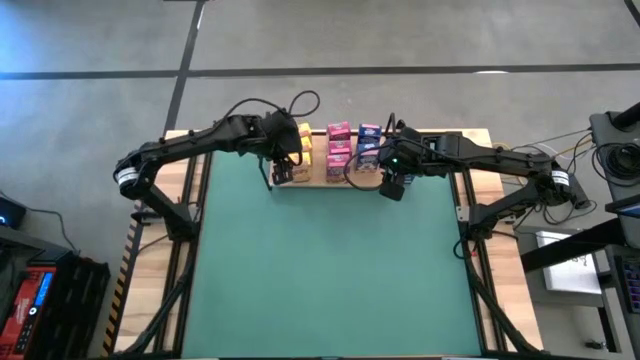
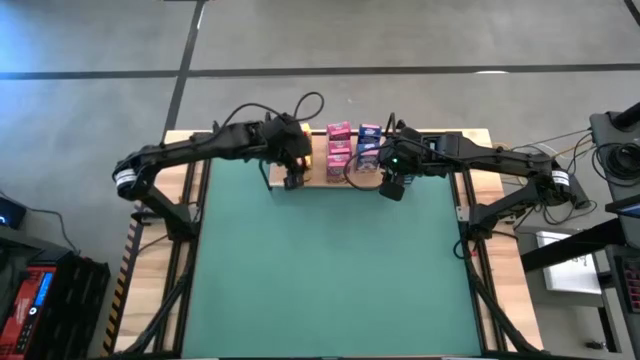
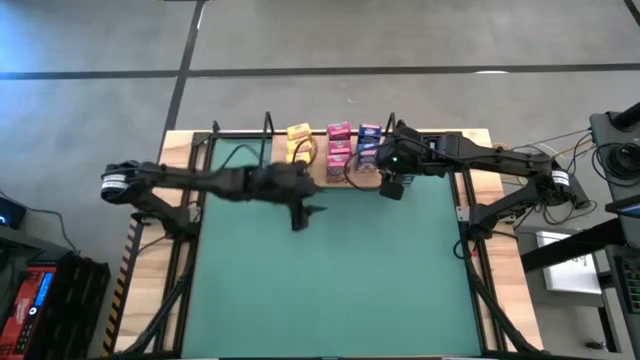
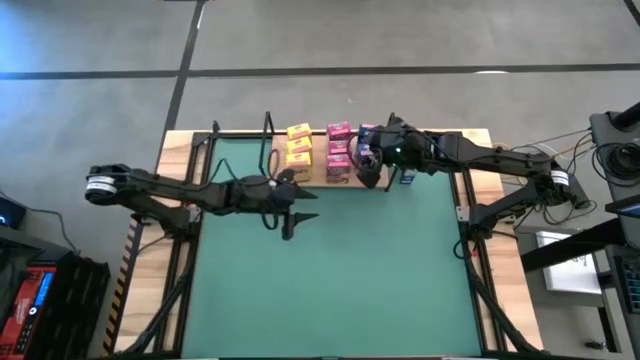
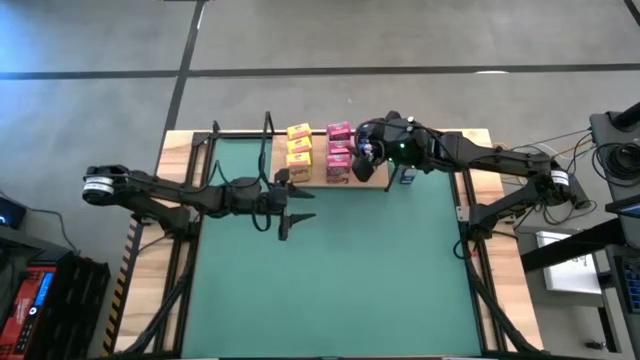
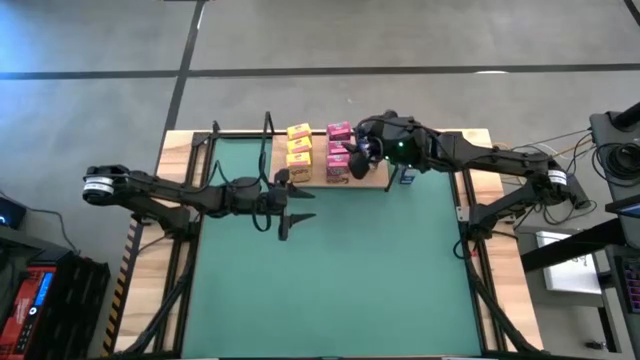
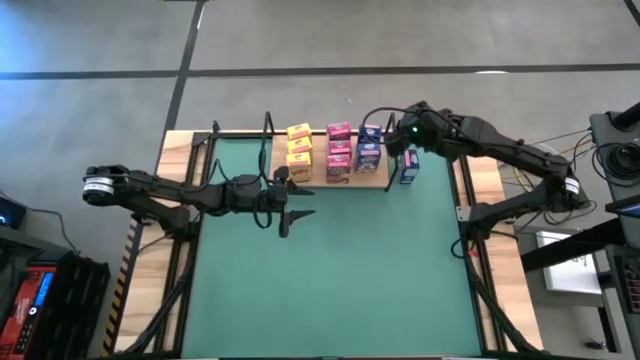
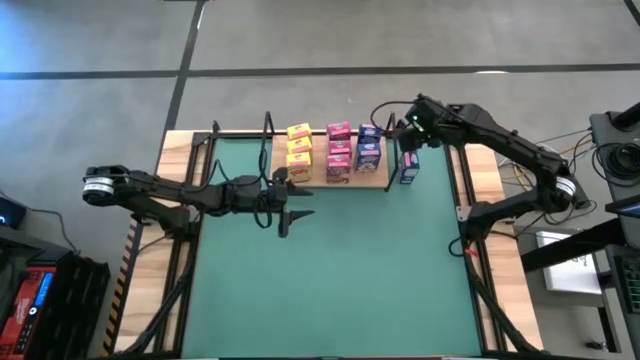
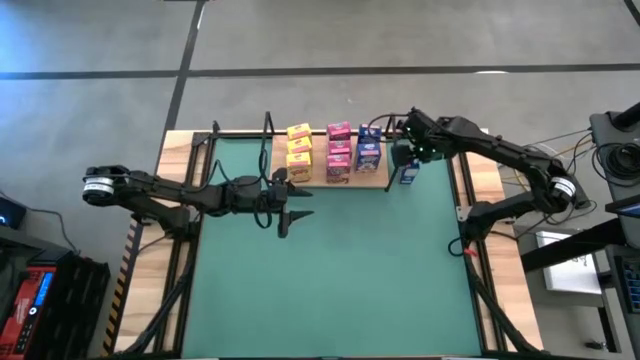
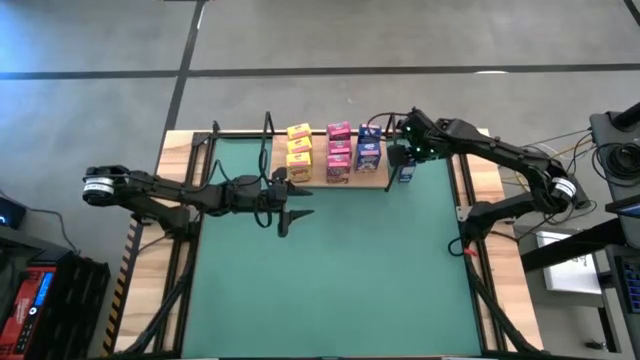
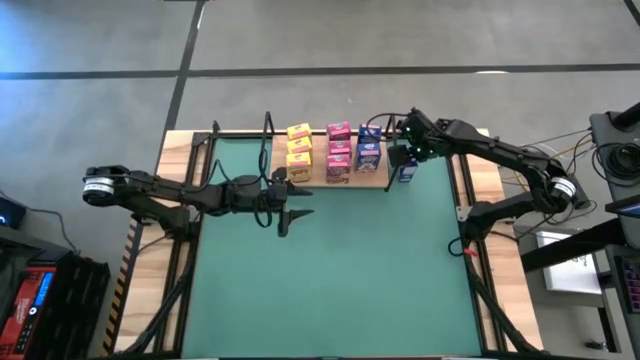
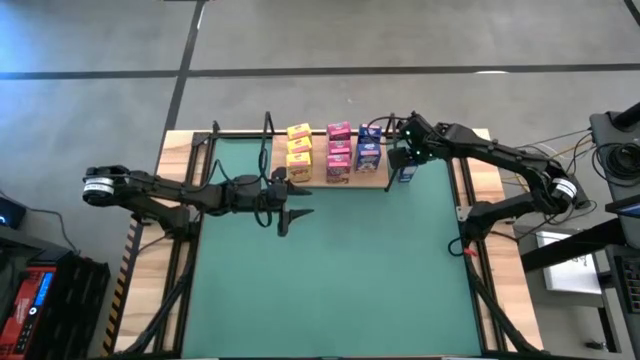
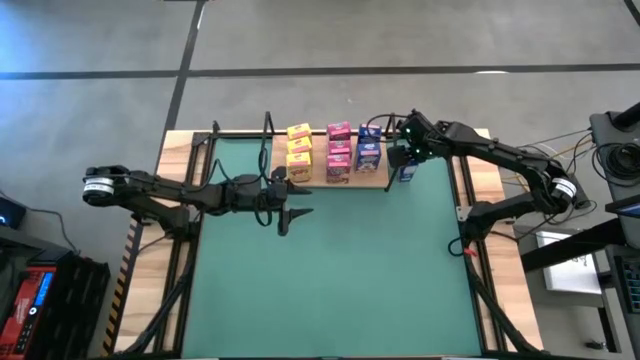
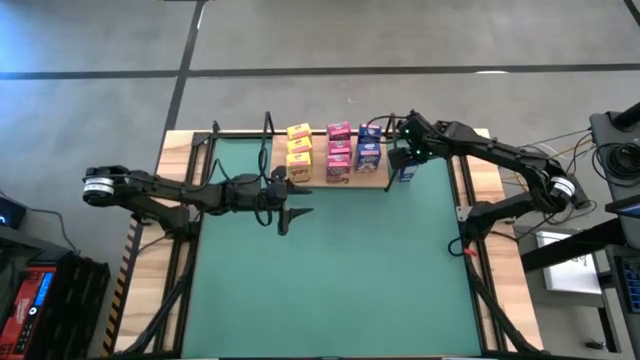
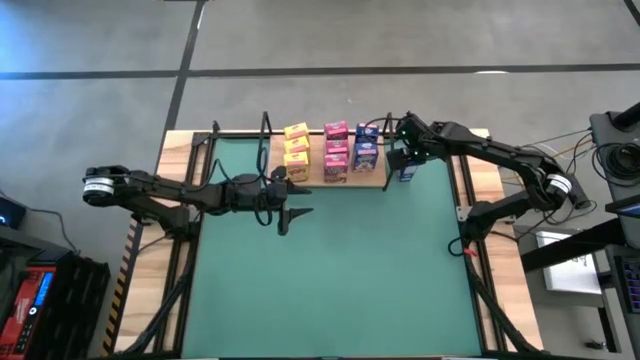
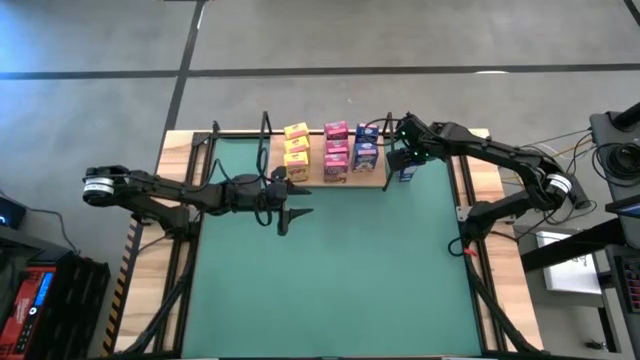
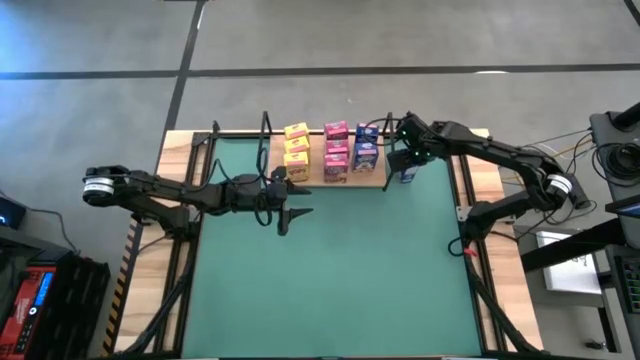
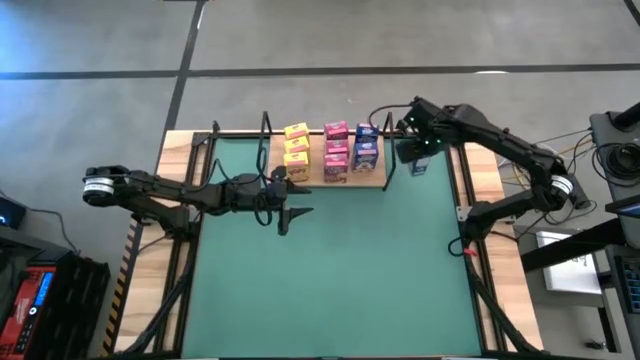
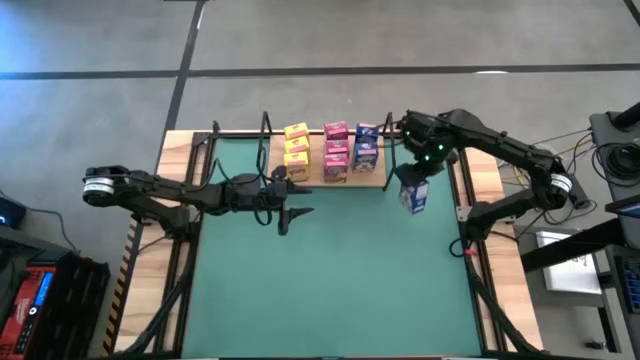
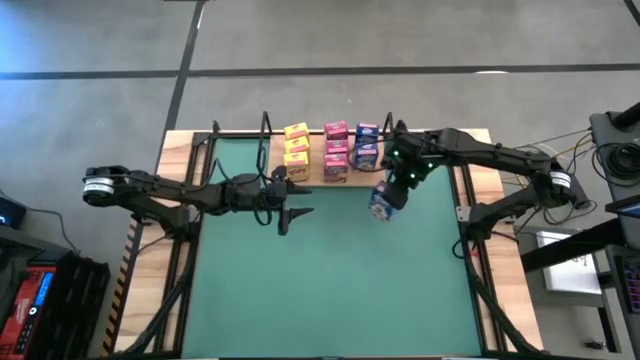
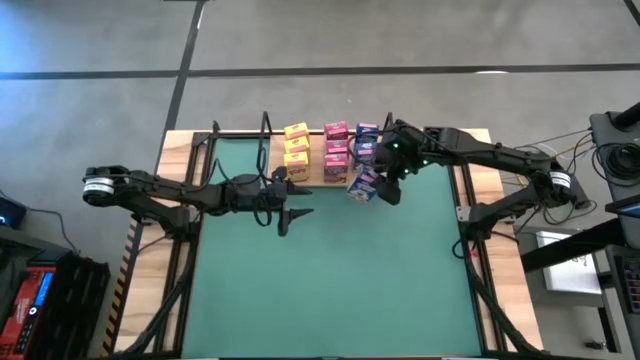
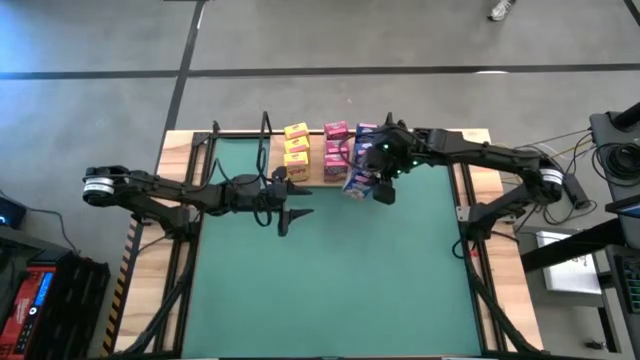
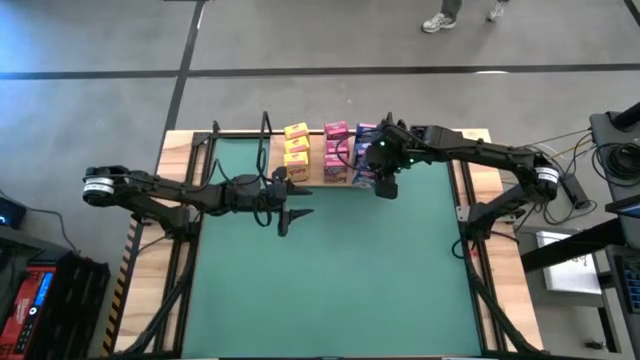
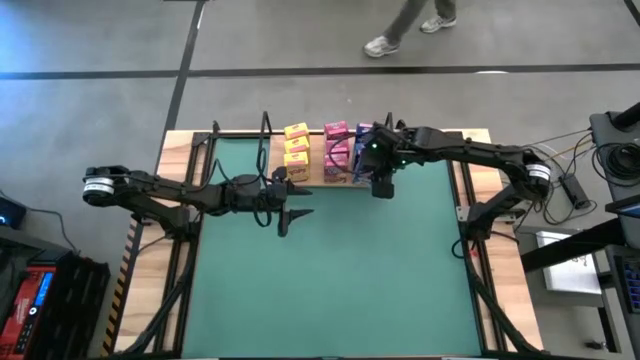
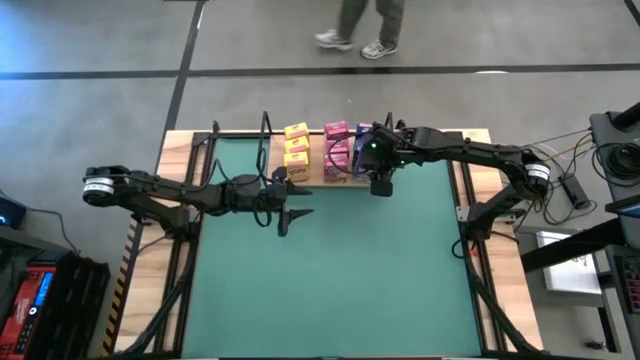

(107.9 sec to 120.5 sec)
Task: Stack cereal on shelf
Put the blue cereal box on the shelf and align with the other blue cereal boxes

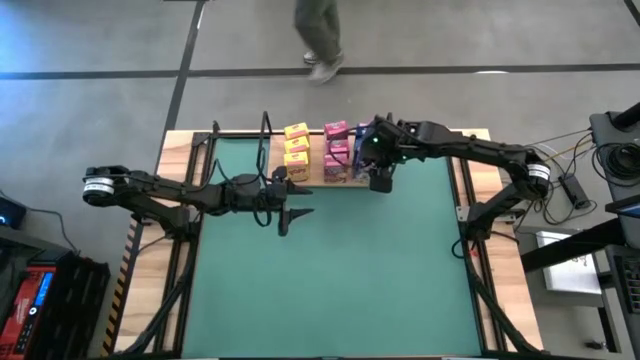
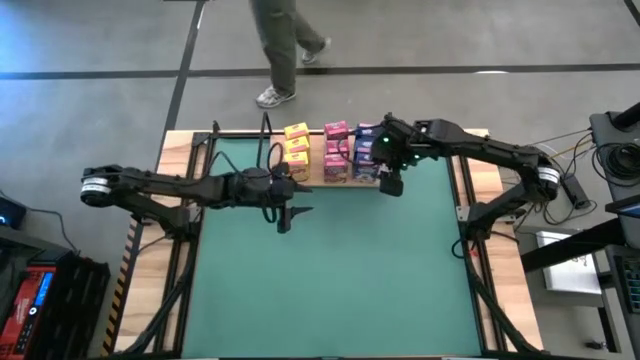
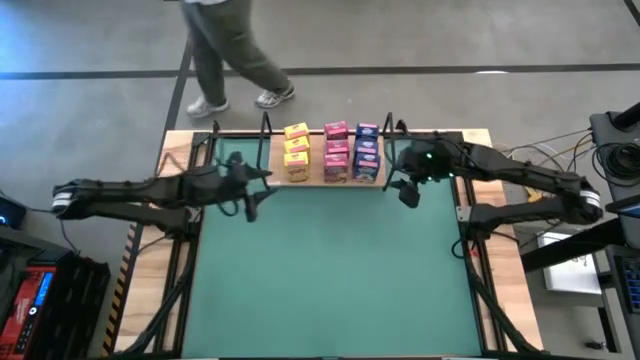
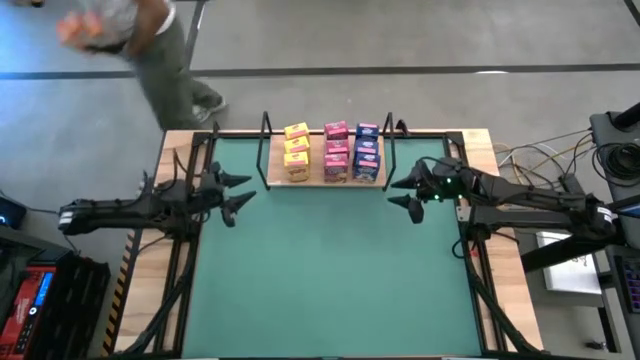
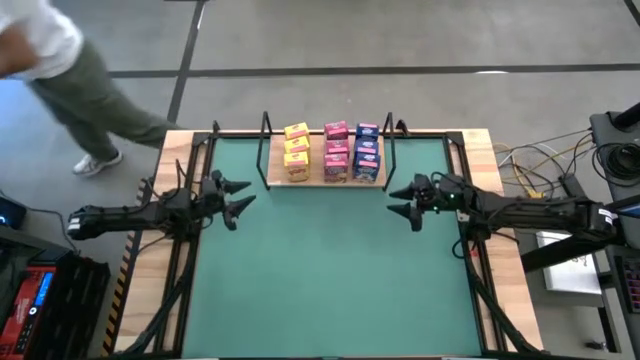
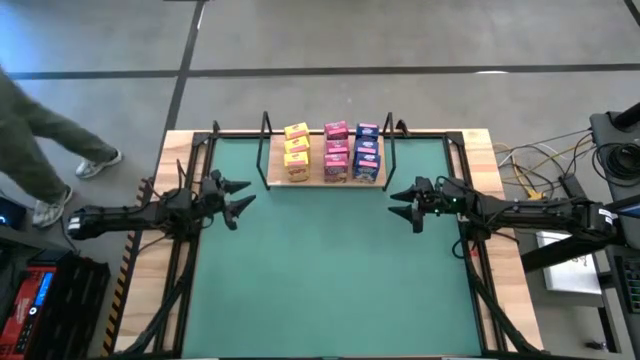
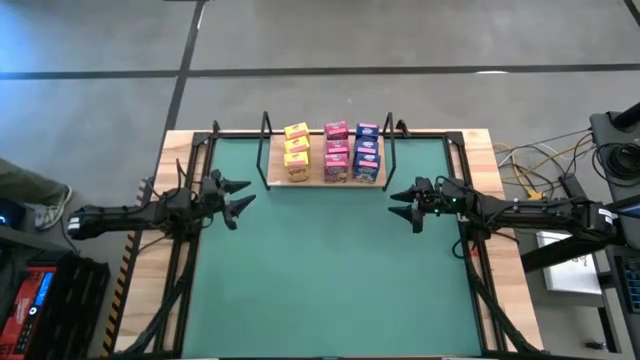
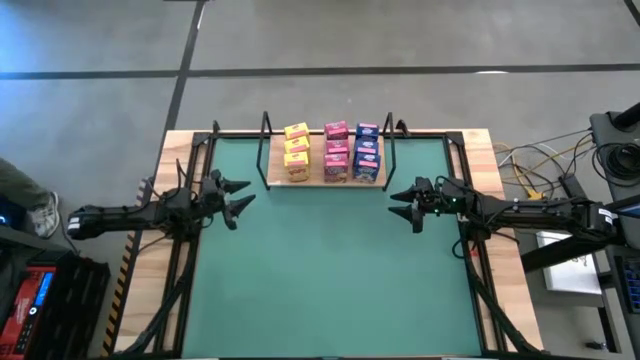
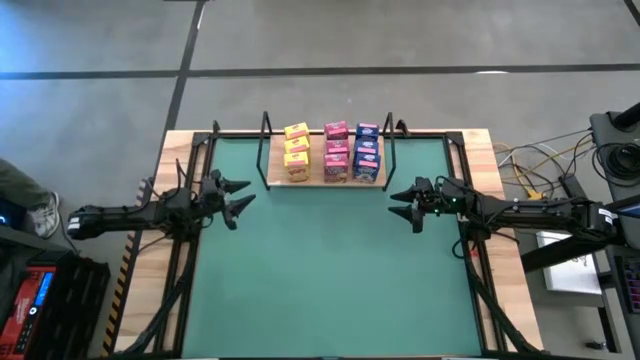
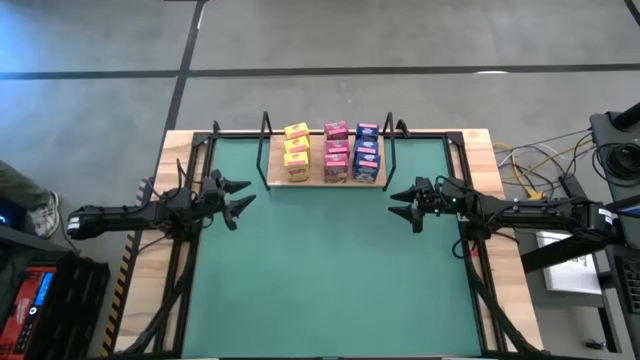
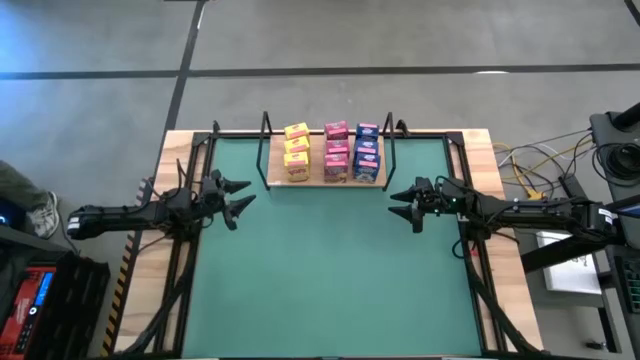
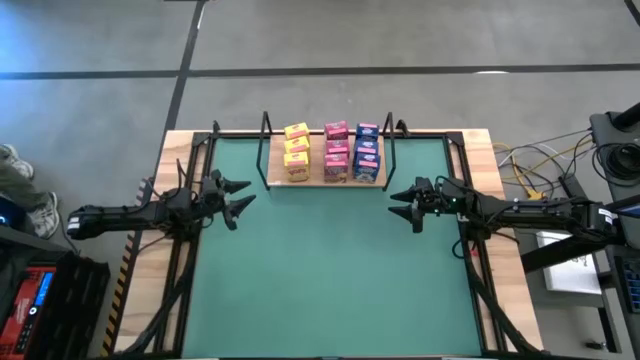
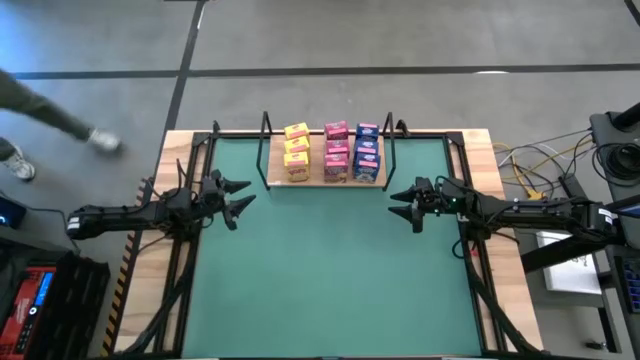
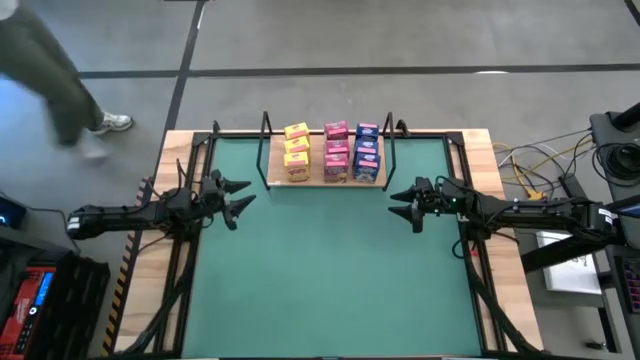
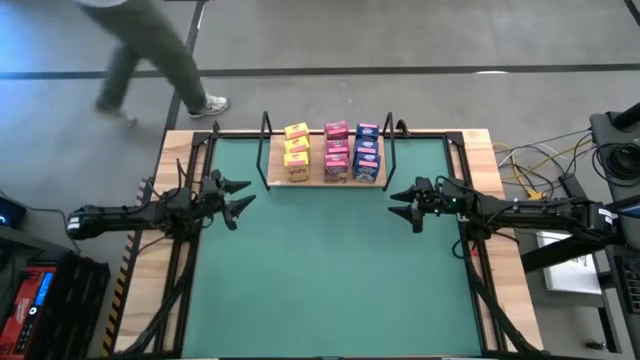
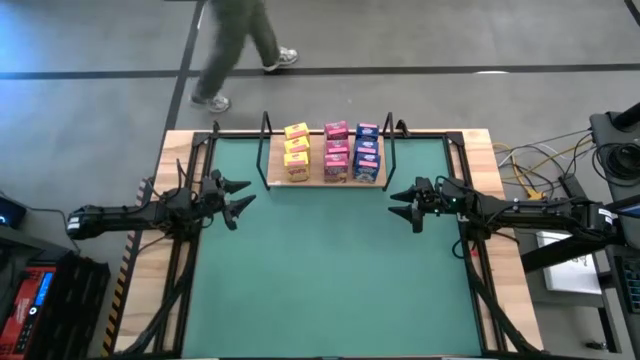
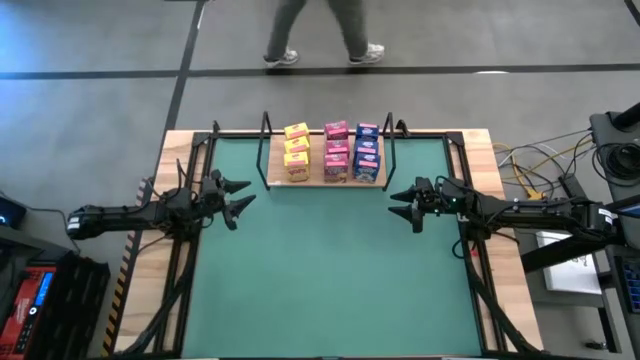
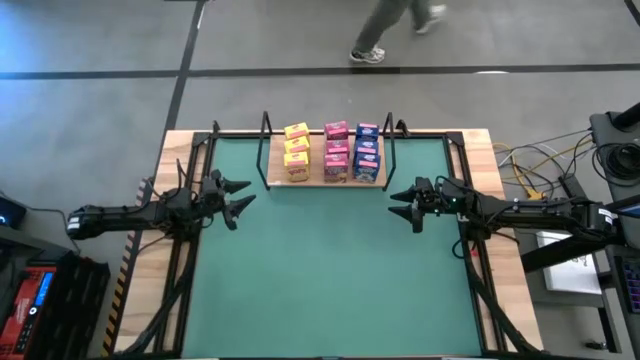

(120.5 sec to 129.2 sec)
Return to Home Position
